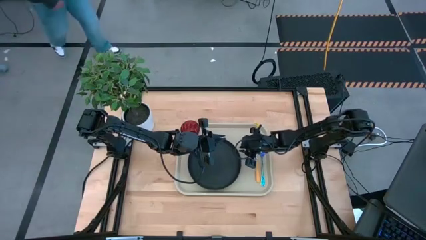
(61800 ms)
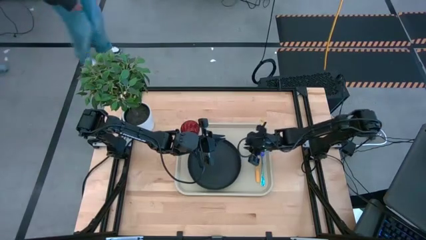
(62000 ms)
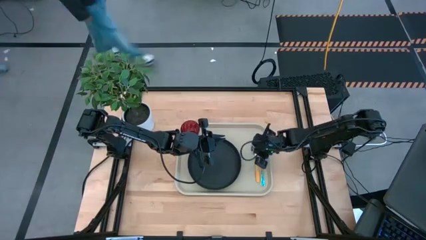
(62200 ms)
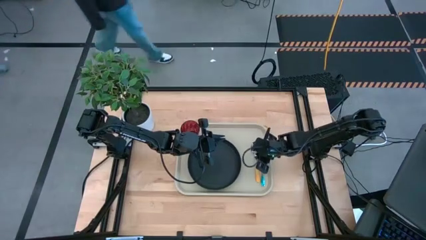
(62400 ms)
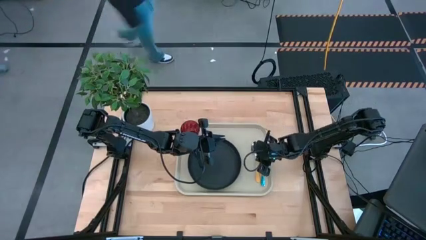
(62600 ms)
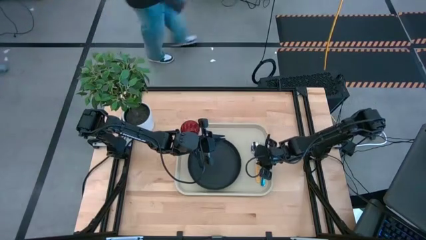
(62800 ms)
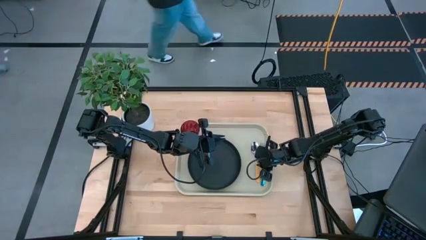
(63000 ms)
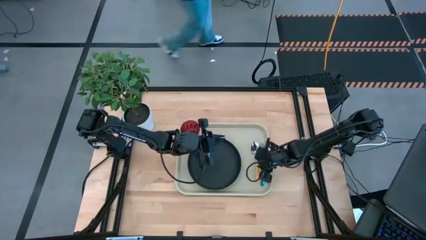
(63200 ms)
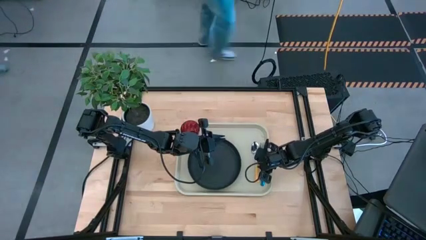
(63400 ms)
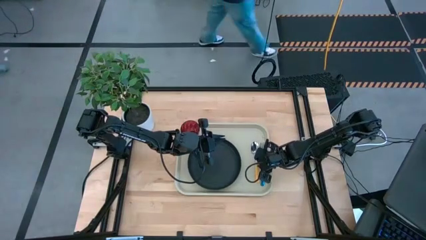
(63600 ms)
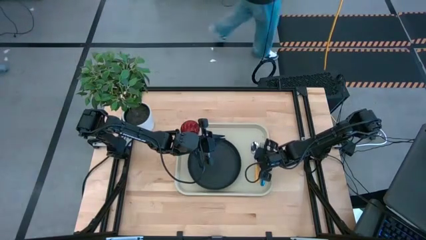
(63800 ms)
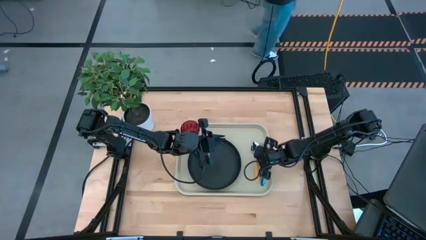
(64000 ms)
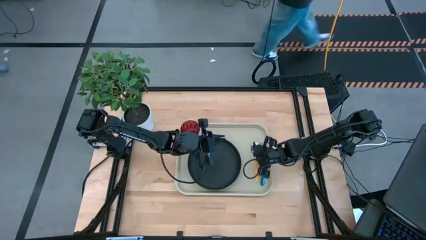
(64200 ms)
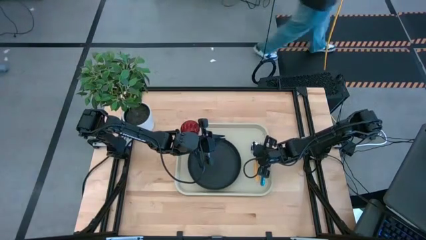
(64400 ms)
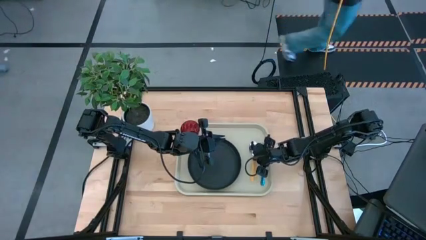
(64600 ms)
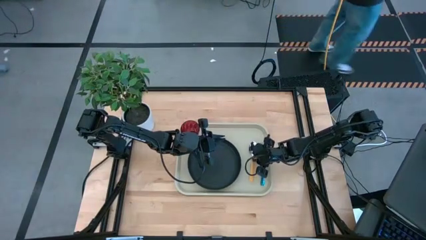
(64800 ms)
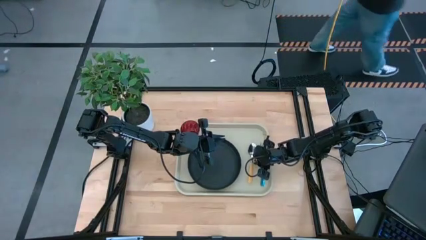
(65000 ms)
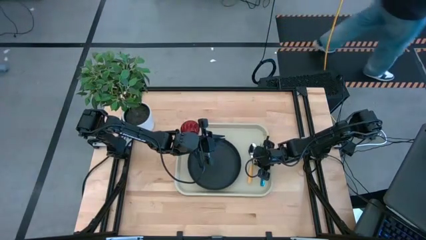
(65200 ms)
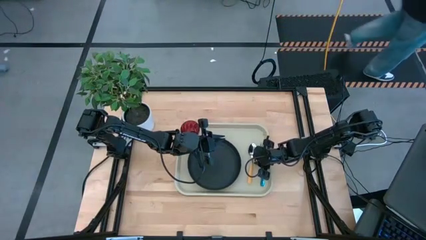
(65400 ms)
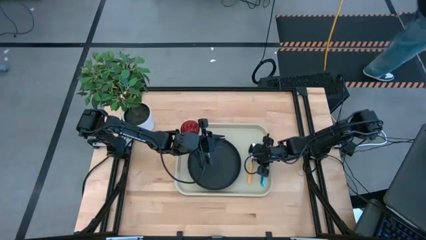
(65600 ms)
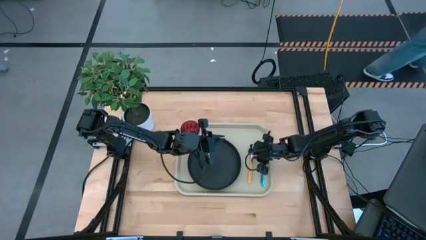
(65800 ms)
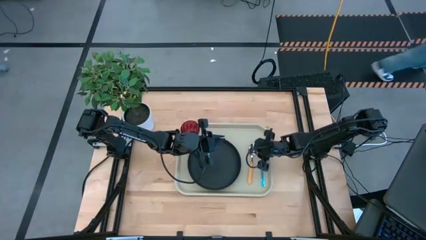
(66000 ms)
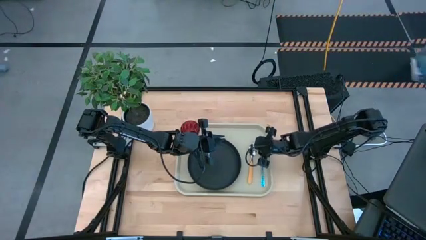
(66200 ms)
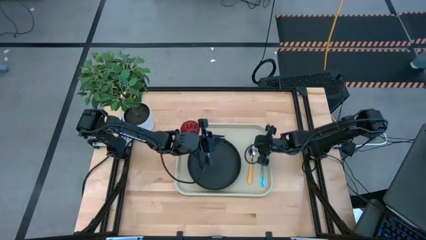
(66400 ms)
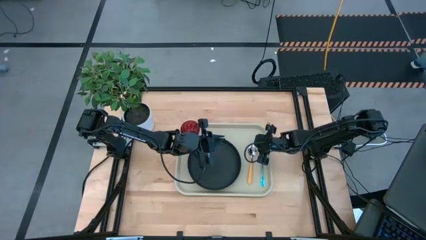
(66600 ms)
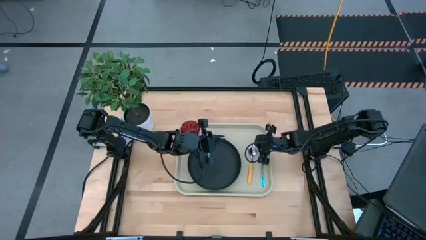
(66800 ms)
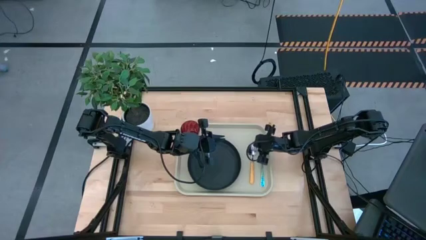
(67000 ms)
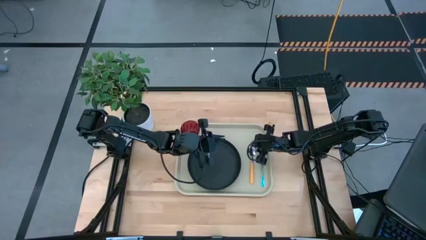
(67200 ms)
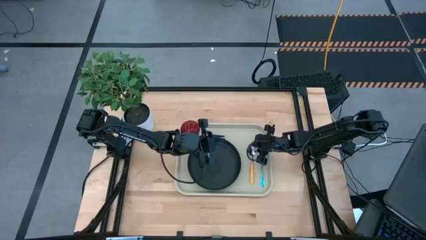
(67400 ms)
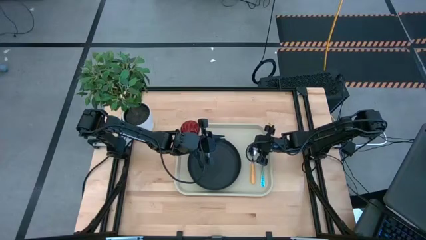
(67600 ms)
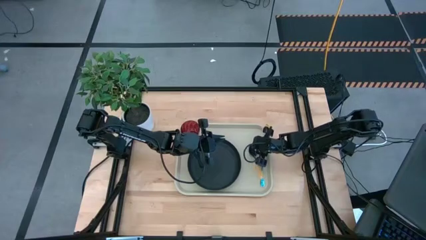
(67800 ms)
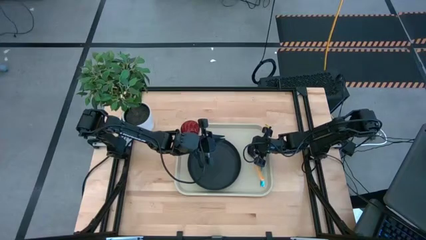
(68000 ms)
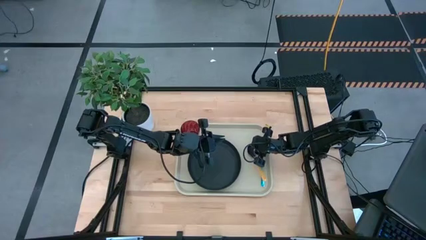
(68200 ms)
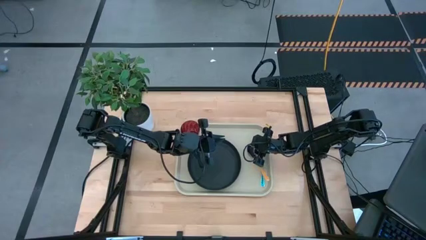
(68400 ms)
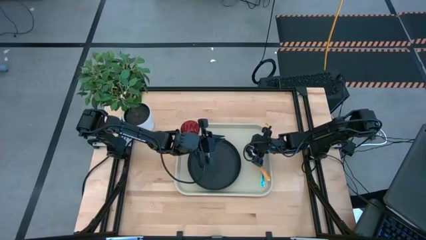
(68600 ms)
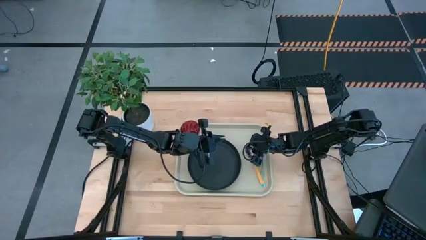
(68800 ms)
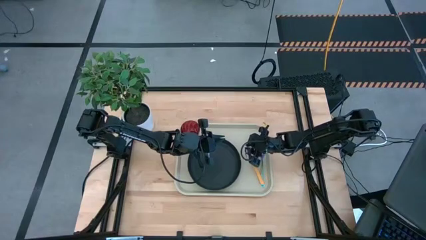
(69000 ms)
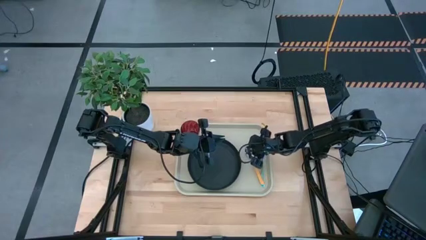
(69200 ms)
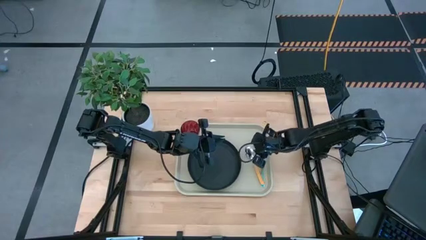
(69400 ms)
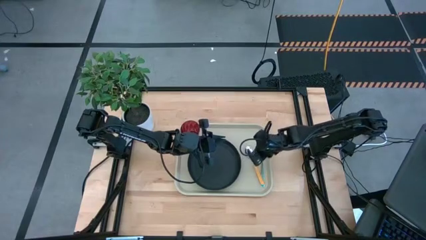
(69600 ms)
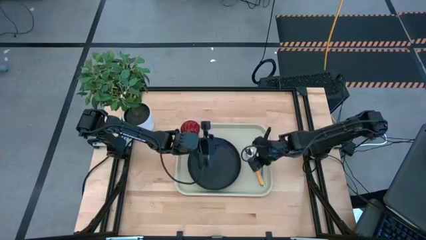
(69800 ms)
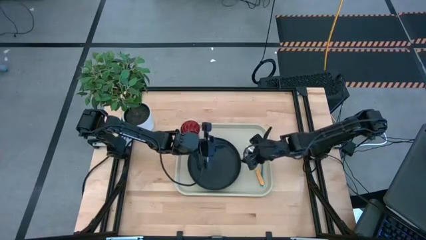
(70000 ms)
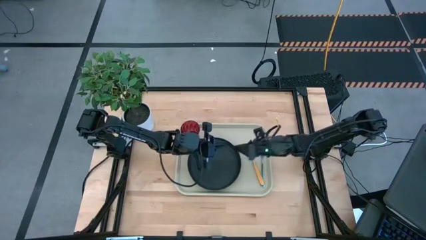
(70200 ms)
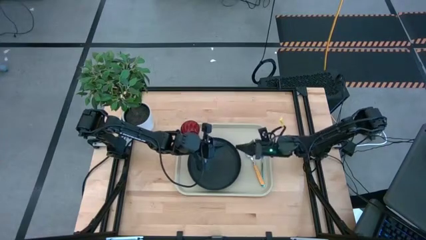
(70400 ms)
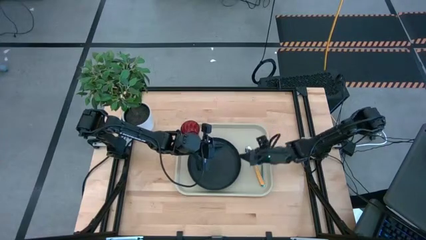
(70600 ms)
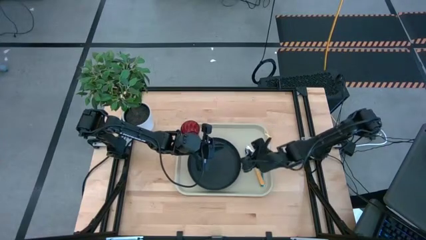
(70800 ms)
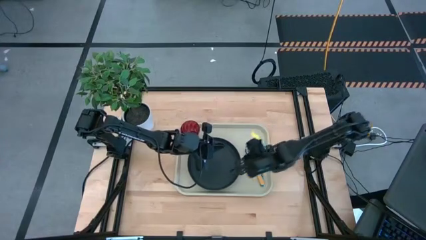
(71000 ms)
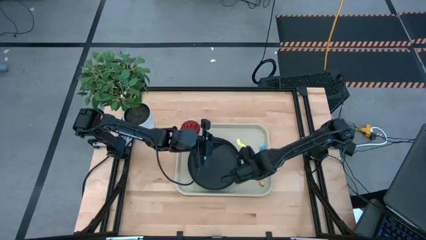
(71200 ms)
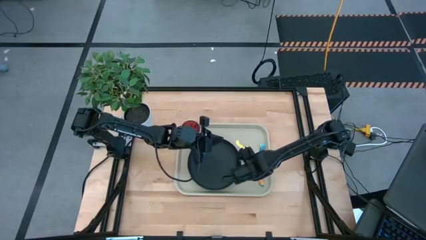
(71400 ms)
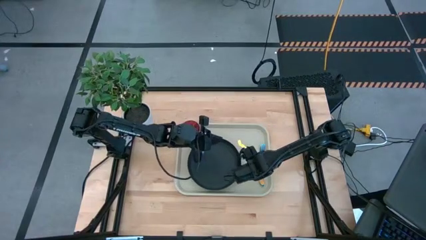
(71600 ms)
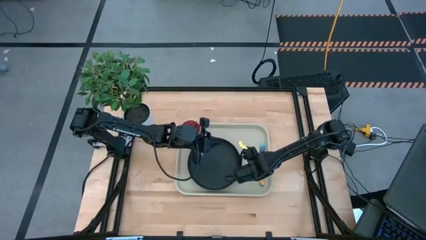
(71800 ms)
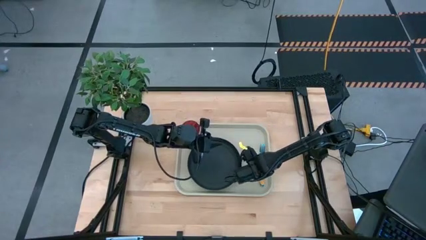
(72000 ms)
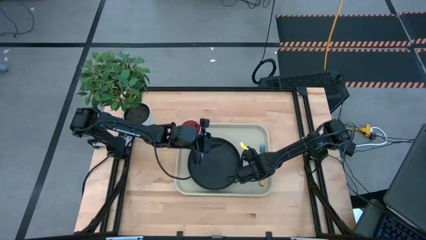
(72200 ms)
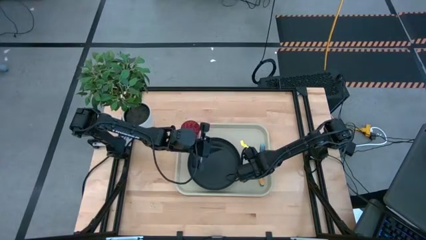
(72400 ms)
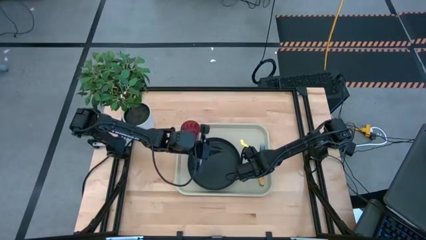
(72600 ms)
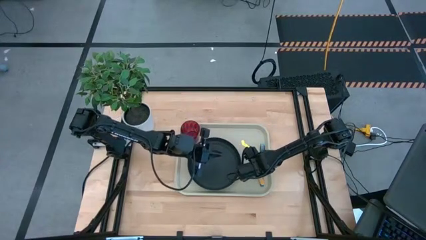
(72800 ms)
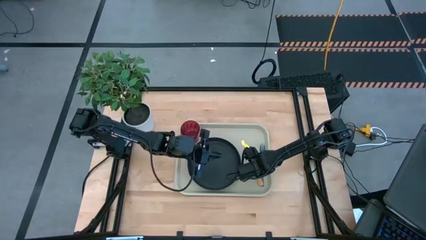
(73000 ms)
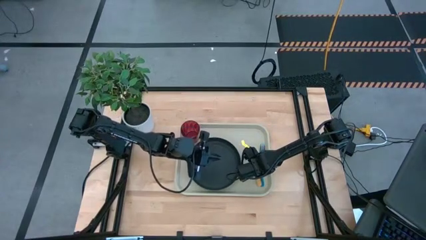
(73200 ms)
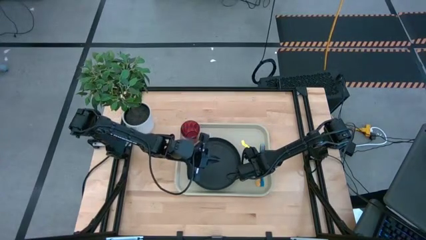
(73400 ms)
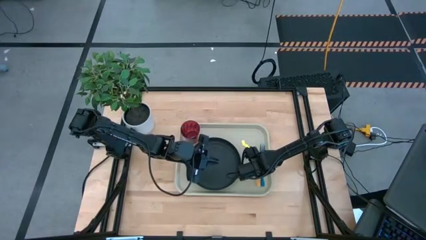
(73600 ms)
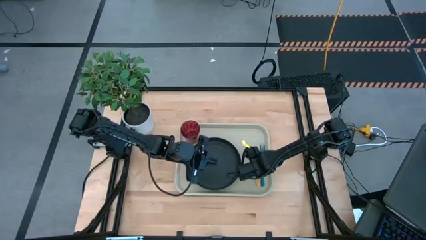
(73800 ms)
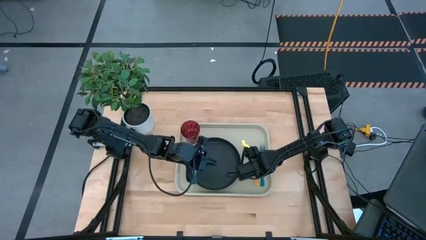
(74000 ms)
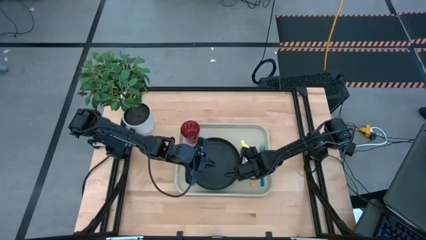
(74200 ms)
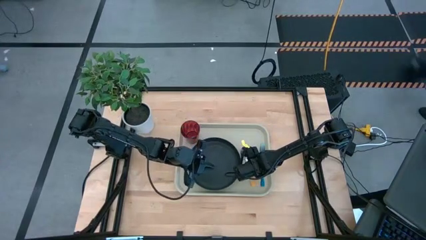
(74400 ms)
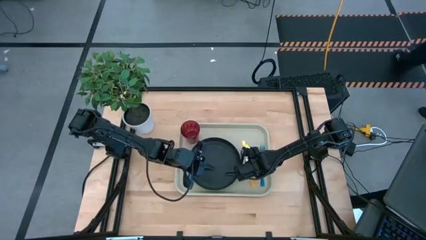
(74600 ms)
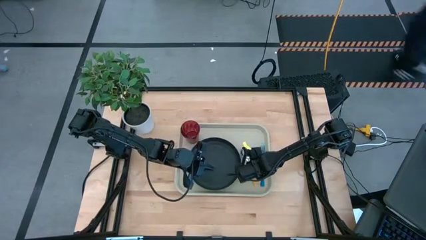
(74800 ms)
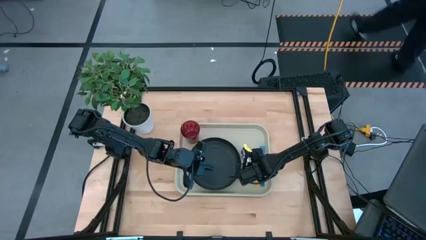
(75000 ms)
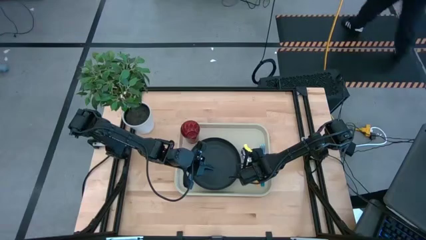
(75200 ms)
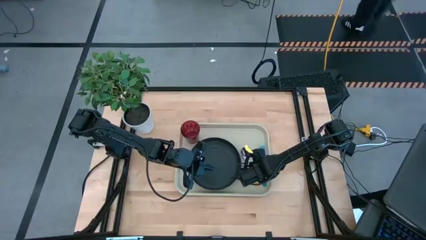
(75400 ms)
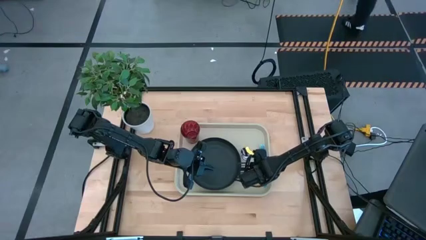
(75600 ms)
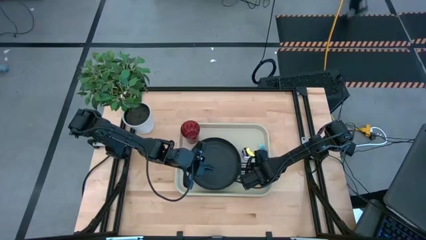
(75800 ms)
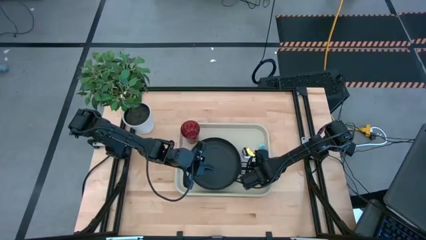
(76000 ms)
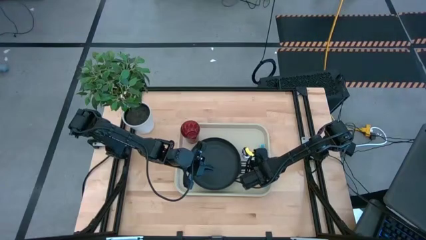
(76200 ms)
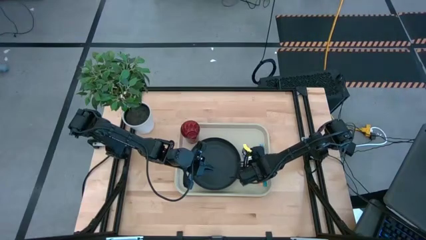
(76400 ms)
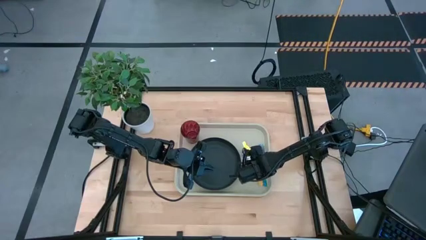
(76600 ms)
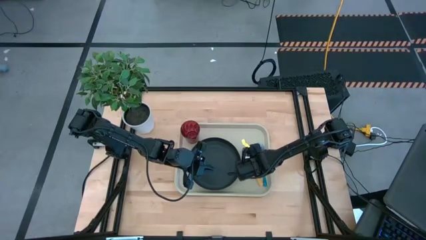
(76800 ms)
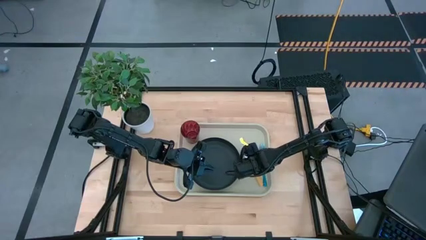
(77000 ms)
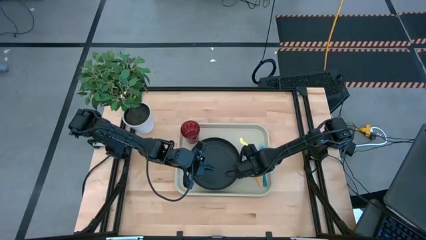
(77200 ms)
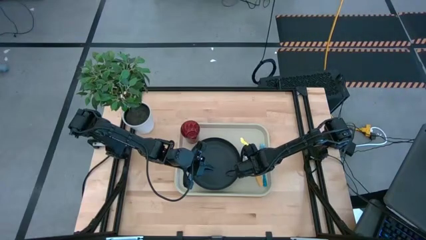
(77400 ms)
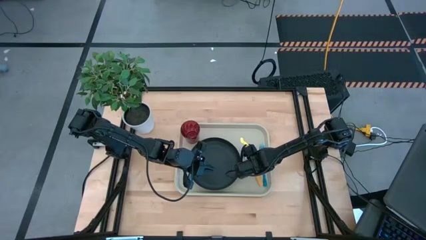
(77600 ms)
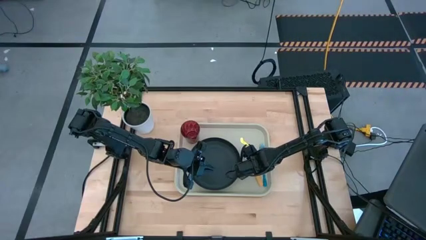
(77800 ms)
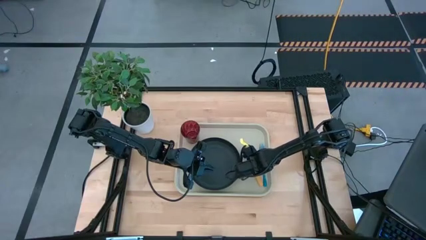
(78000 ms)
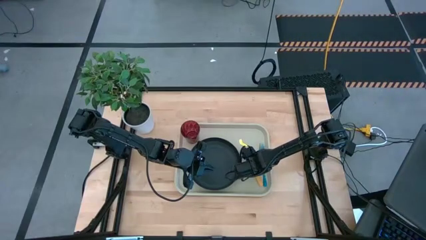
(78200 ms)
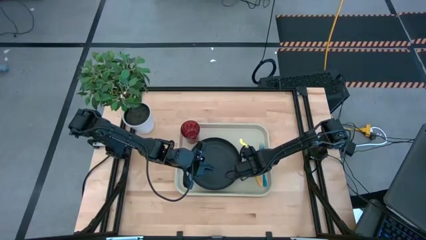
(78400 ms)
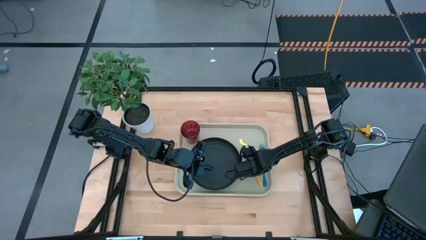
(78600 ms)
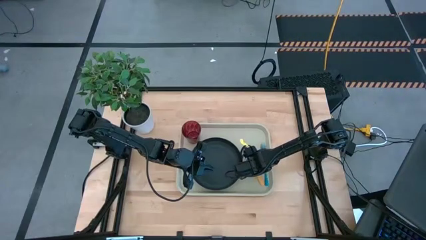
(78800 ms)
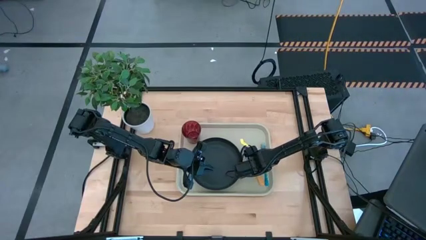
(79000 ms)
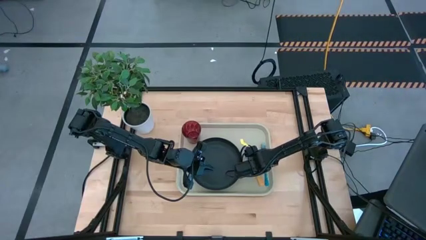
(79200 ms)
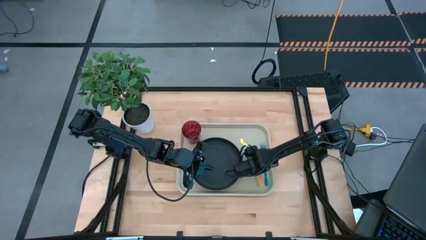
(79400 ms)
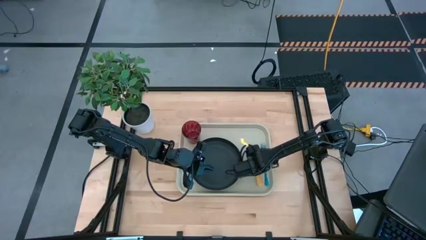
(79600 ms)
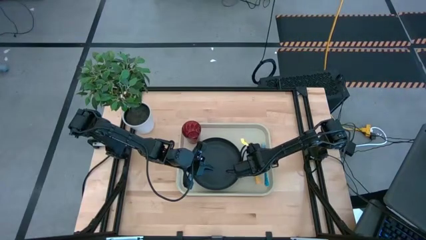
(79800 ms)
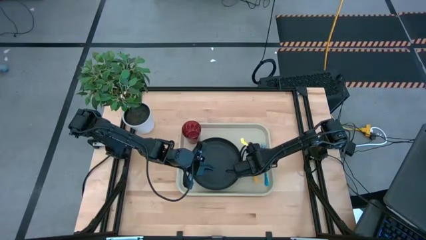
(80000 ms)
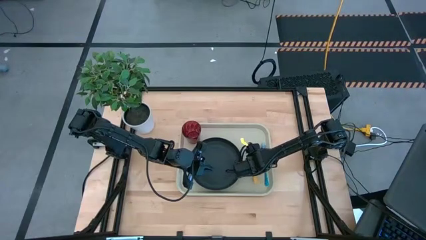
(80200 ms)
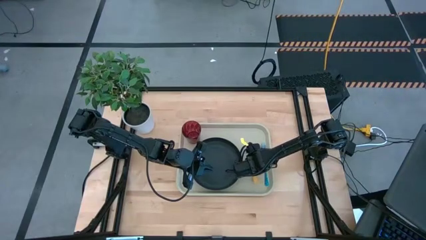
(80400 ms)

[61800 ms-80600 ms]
Task: Pick and place plate/cup/fork/spoon on tray
Adjust the spoon position
